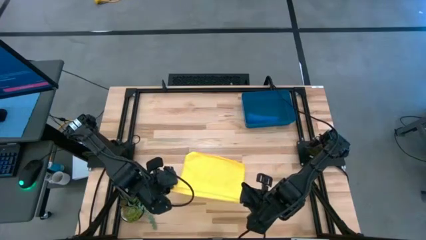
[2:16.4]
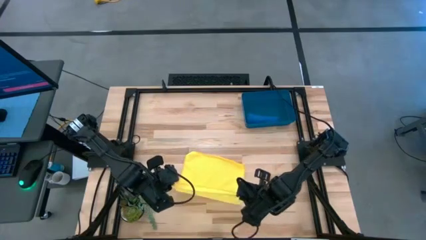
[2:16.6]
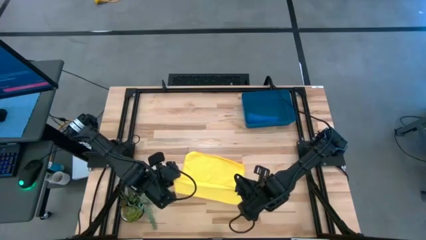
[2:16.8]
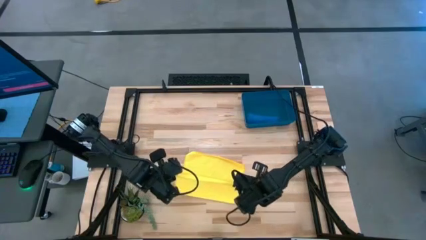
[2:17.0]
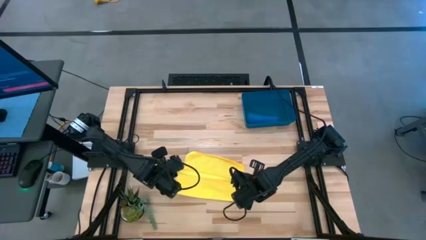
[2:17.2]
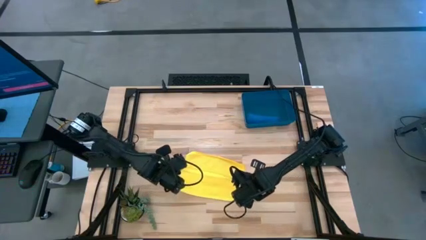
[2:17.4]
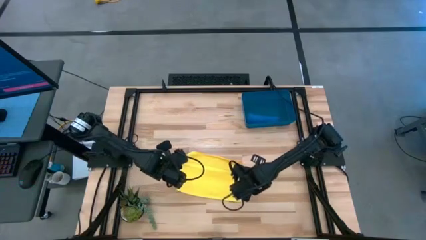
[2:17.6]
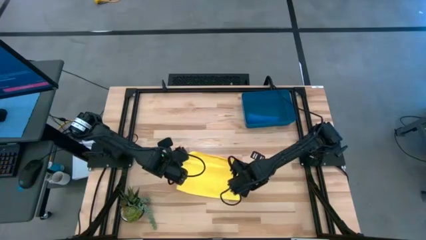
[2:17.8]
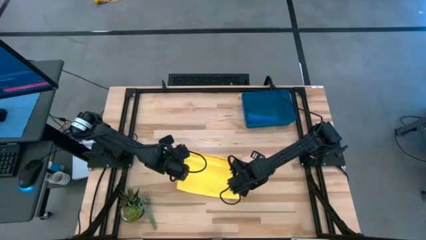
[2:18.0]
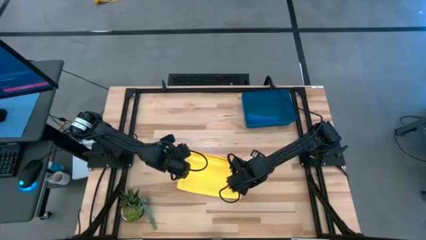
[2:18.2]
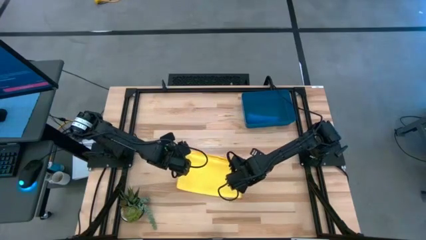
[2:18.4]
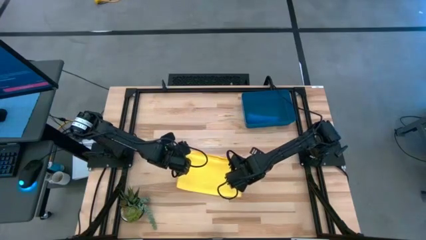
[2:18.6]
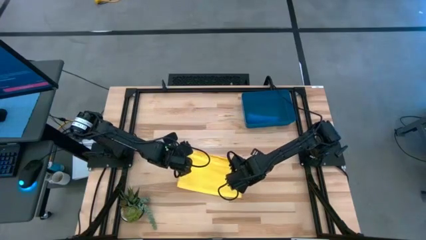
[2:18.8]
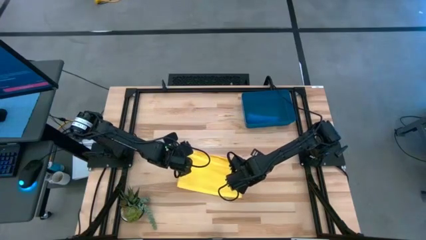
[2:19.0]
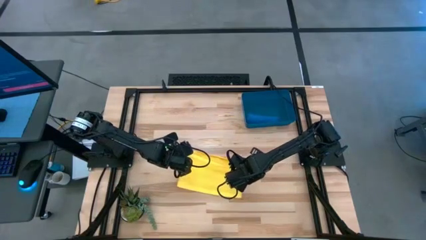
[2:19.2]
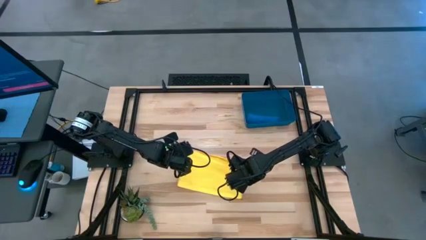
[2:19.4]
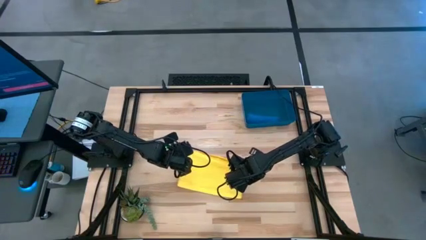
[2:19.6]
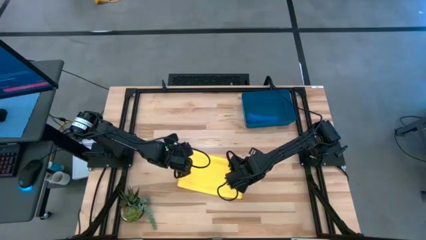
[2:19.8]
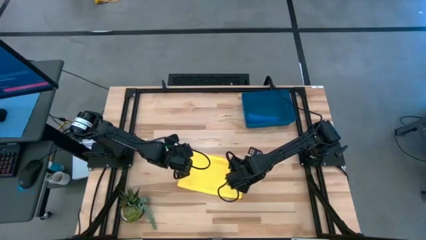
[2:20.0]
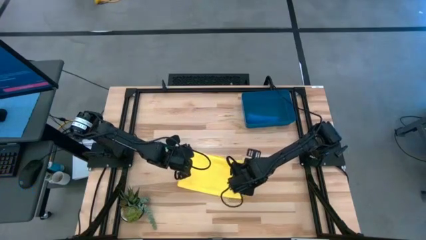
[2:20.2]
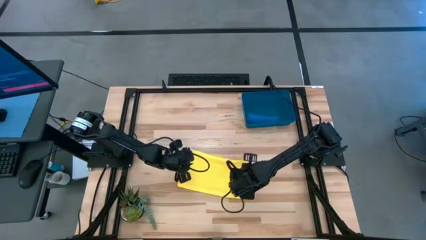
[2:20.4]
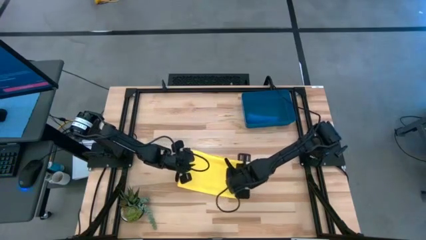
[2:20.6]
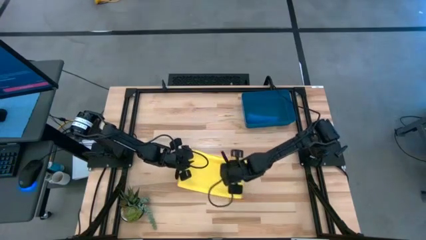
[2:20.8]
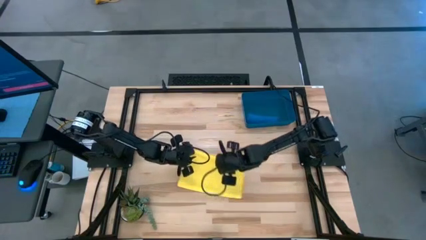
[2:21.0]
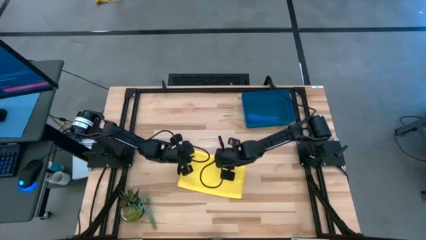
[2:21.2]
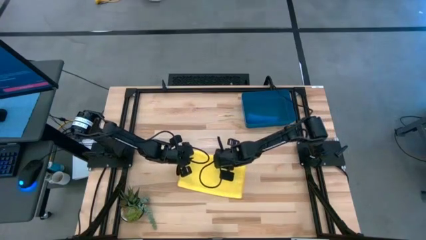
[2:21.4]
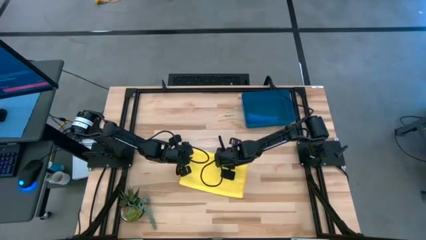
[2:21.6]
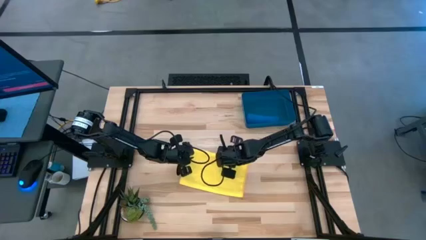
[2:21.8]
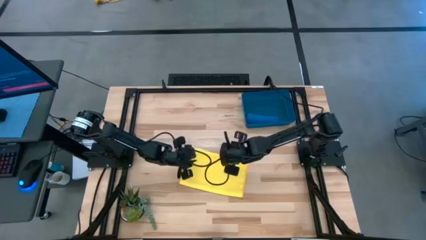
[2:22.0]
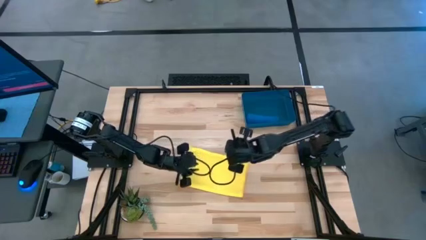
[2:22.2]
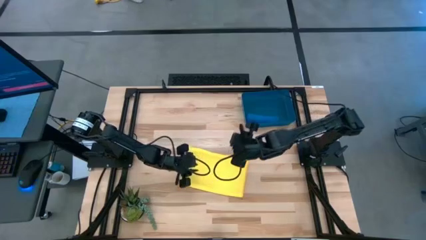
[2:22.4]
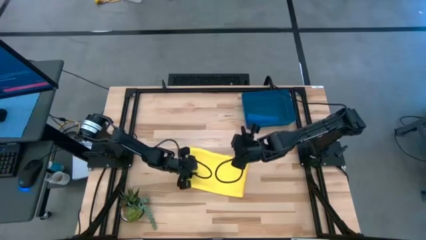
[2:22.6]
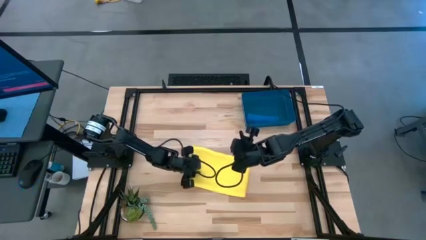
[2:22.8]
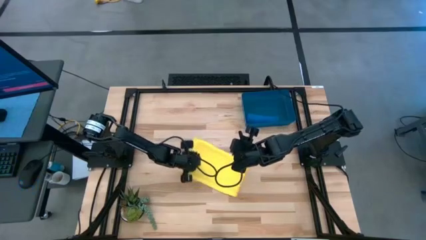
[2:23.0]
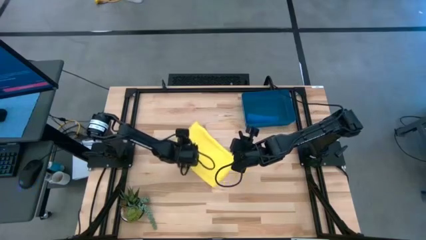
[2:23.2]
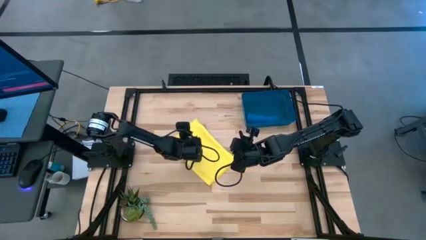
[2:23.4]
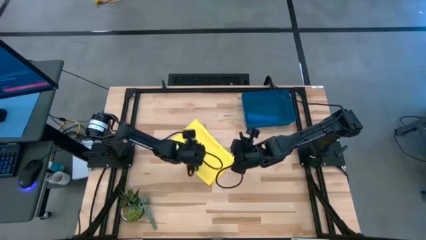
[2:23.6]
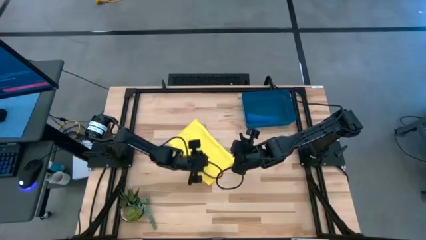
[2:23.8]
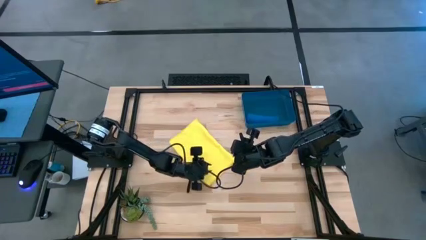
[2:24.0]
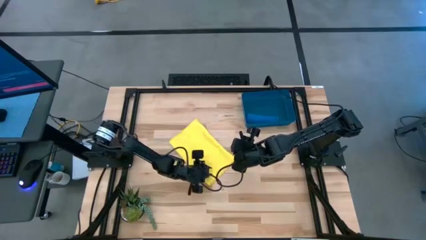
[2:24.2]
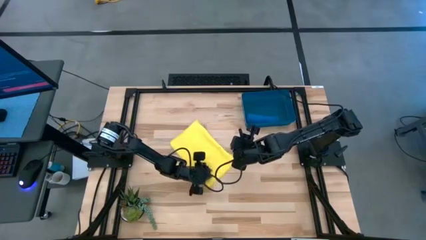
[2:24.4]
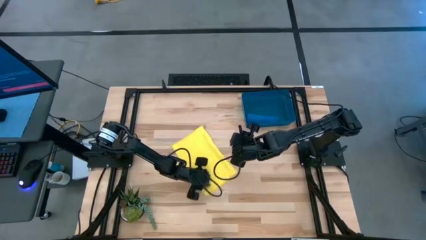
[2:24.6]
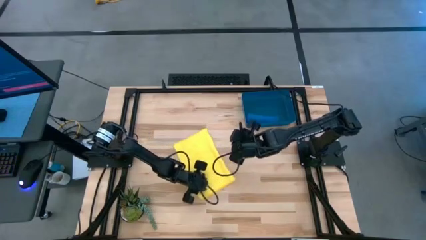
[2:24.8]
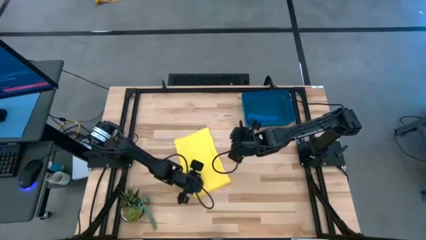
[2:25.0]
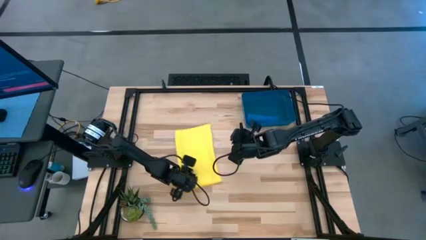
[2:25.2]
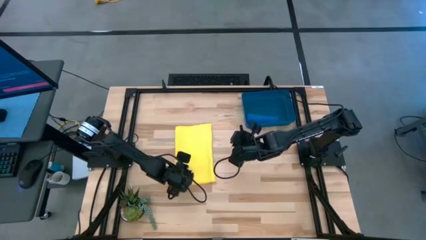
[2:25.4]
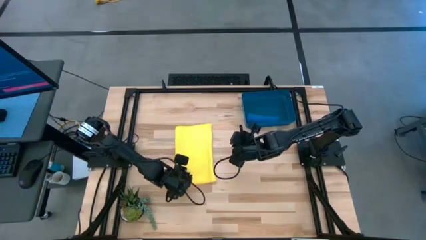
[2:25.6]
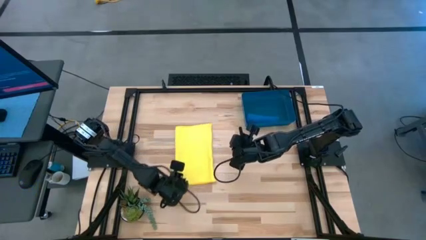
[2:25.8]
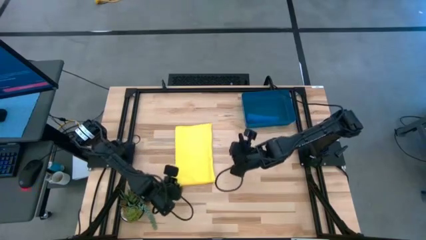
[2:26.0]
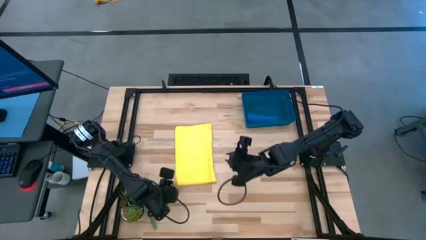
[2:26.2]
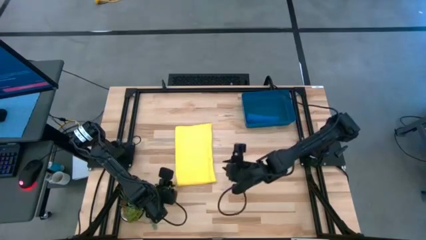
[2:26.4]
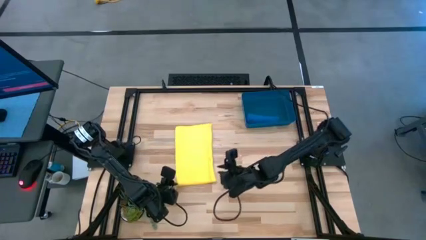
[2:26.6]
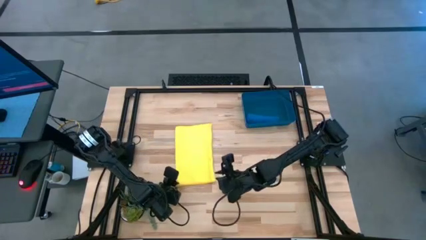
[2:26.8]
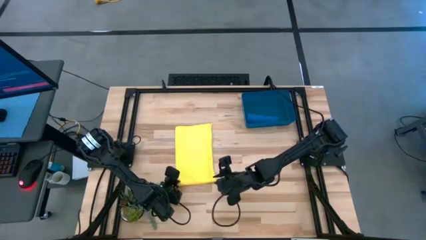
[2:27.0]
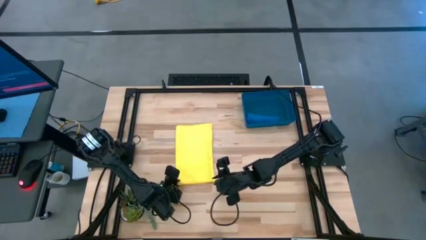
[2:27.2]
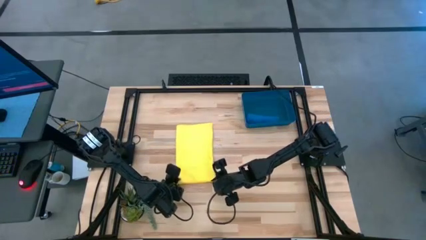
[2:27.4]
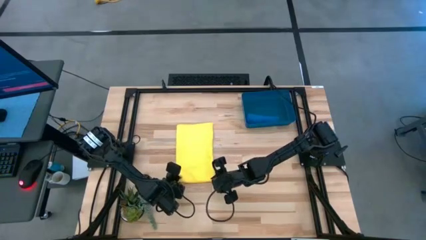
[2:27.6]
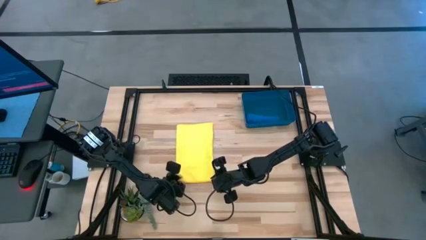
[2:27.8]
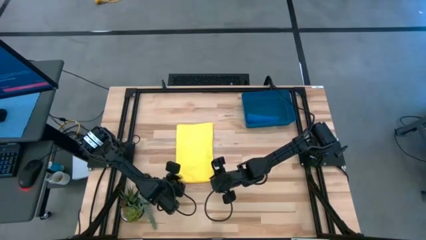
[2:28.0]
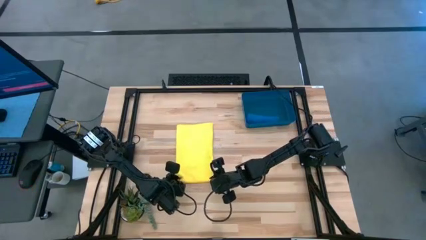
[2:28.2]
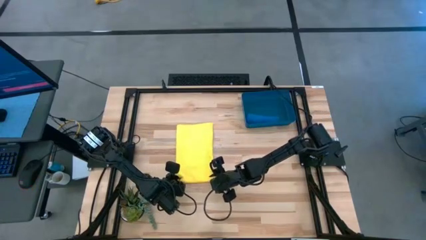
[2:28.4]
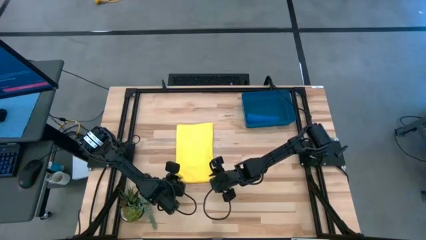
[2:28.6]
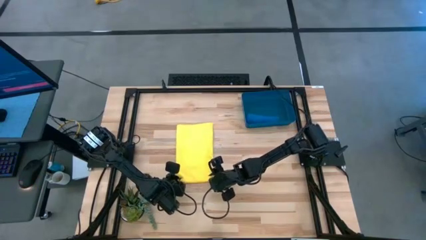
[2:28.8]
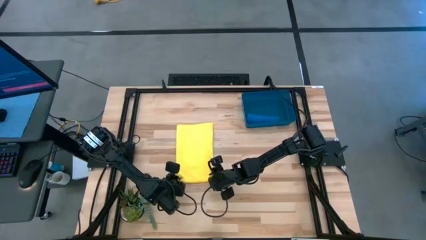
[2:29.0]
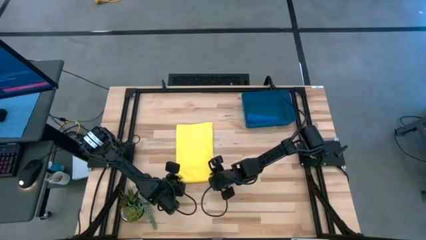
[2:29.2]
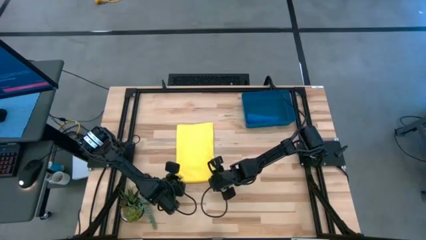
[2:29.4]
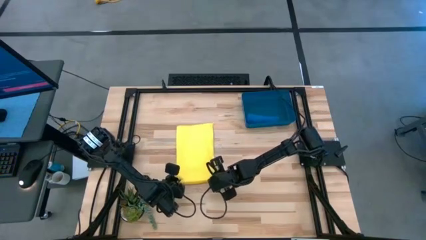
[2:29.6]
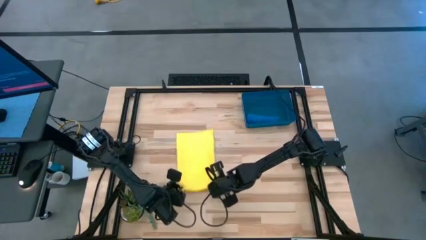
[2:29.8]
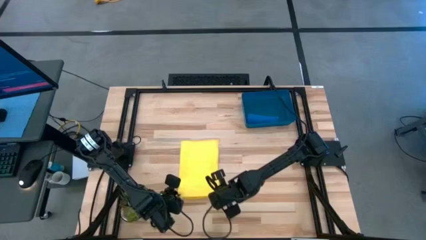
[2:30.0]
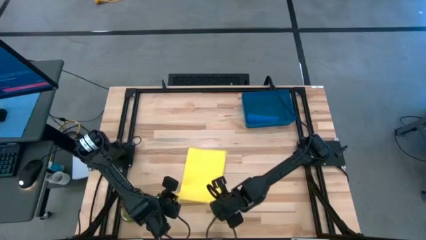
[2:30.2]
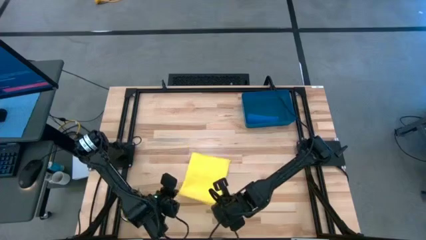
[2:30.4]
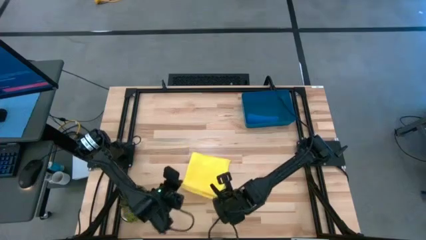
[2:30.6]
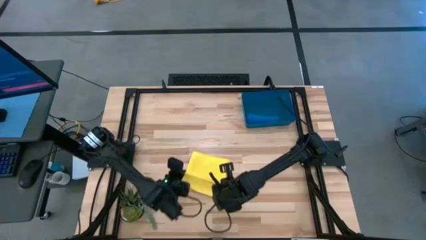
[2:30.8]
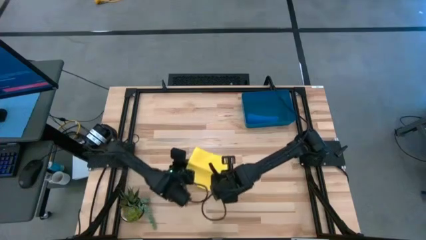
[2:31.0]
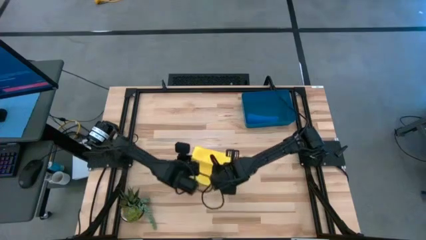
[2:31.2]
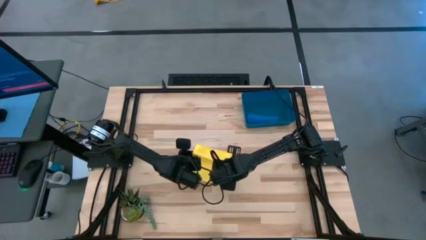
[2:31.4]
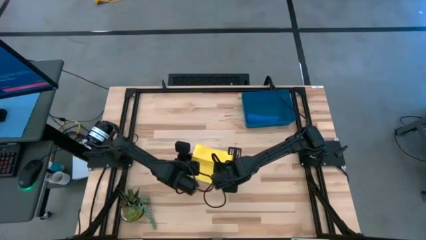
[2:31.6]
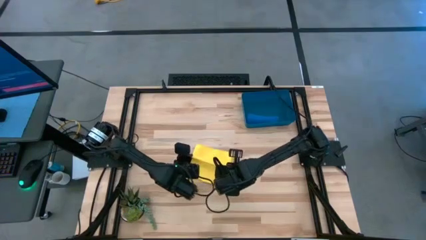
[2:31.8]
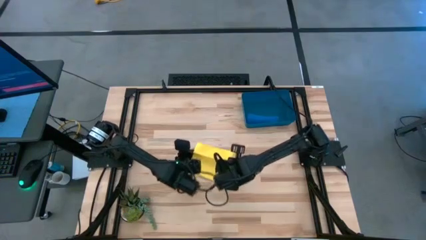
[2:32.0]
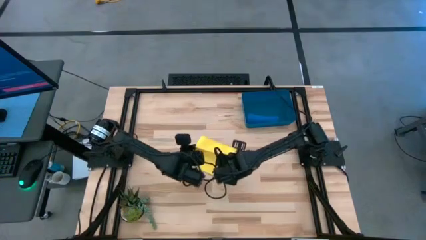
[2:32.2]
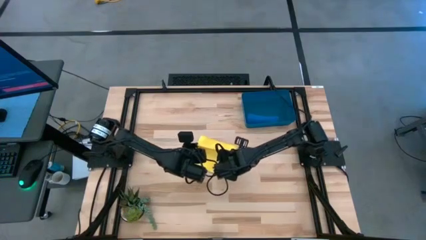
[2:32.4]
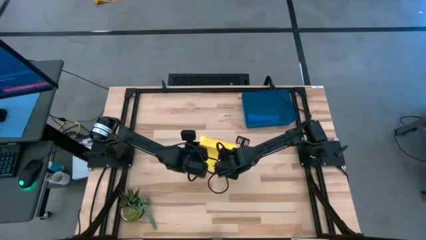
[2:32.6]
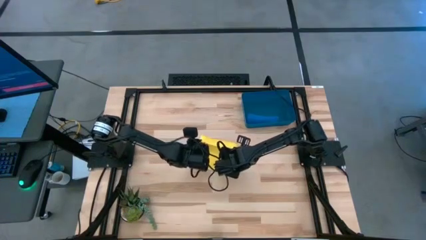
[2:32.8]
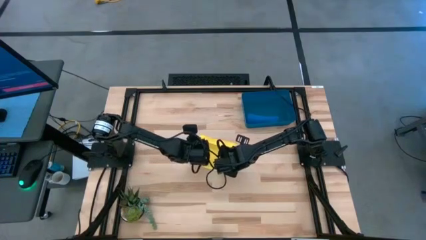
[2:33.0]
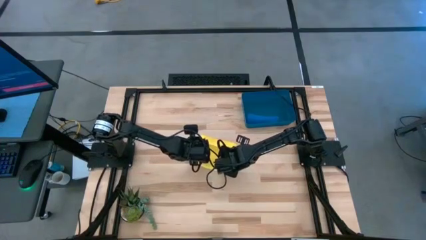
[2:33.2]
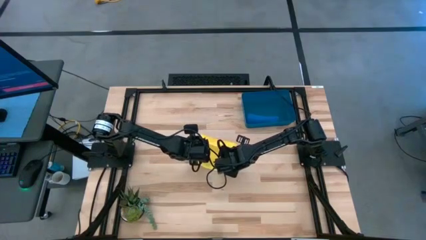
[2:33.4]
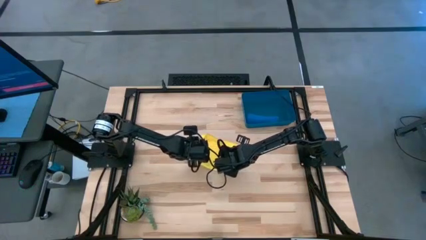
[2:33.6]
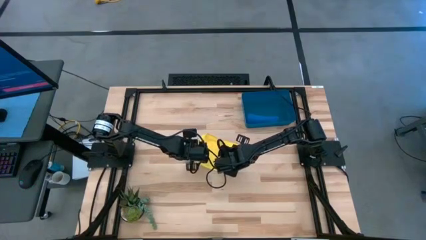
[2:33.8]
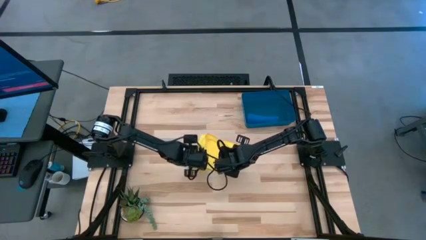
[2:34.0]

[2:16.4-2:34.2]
Task: Roll microfiber towels into tight, uniform cylinder then place into a basket
Roll the yellow microfiber cloth
